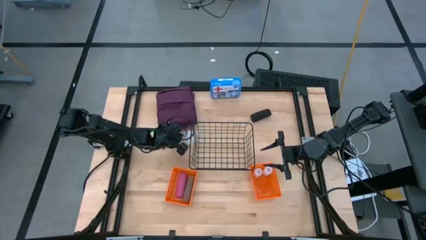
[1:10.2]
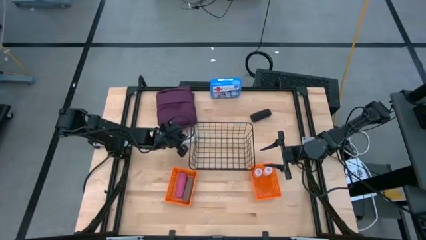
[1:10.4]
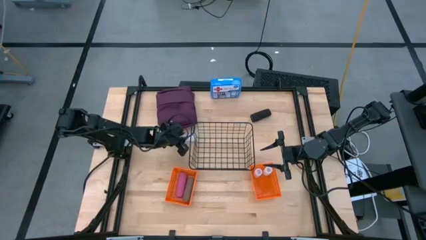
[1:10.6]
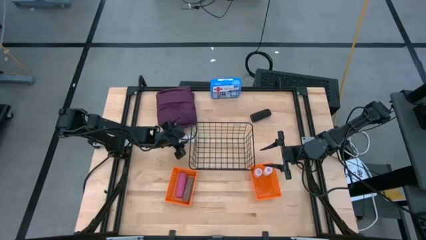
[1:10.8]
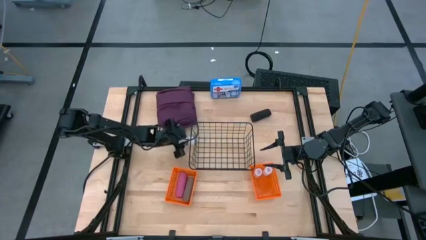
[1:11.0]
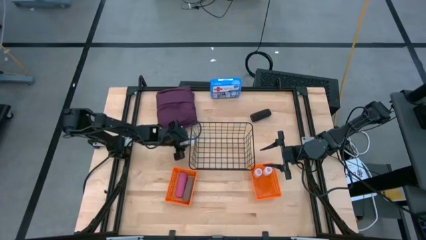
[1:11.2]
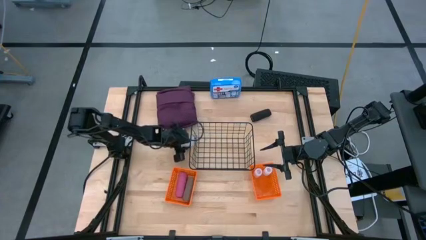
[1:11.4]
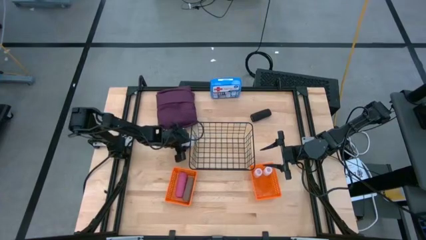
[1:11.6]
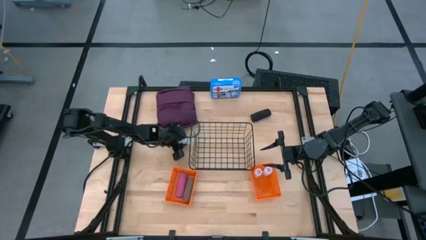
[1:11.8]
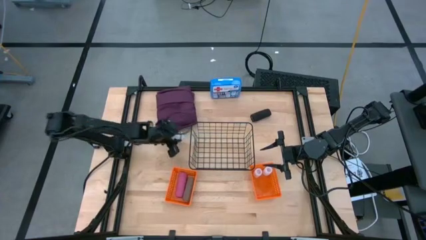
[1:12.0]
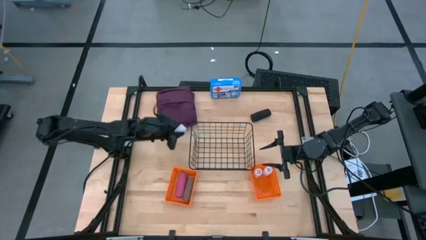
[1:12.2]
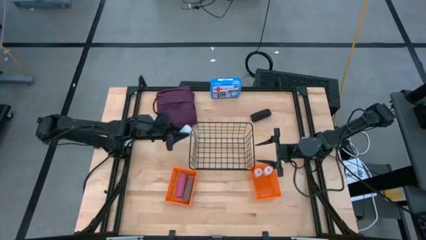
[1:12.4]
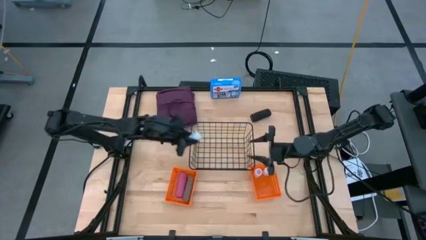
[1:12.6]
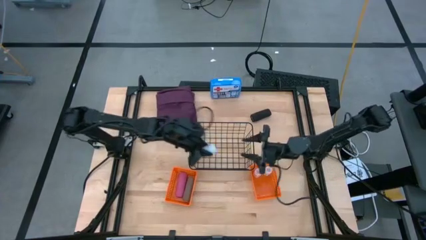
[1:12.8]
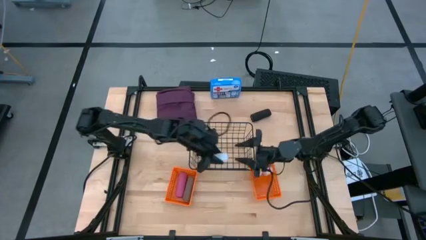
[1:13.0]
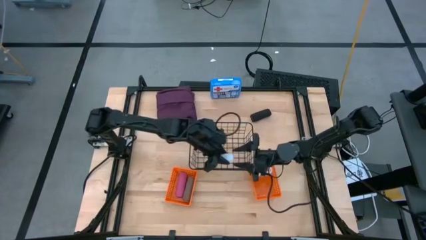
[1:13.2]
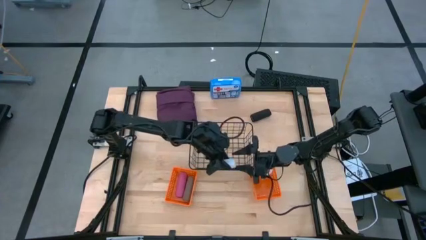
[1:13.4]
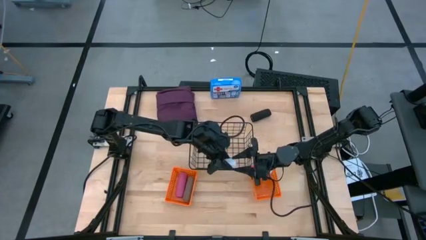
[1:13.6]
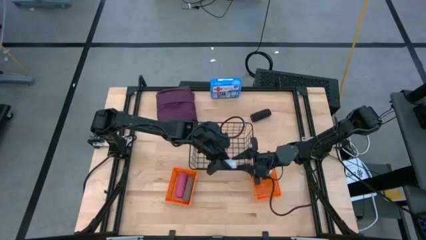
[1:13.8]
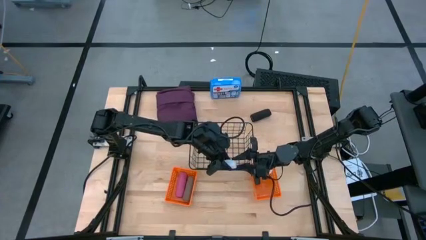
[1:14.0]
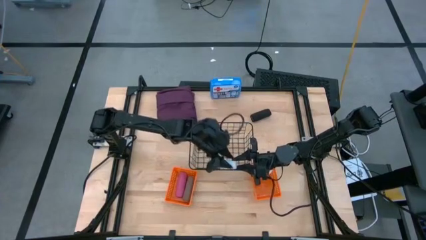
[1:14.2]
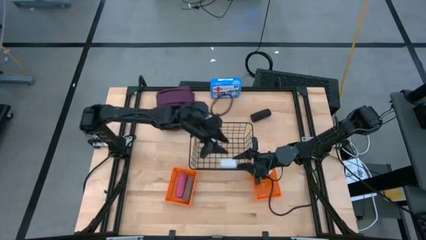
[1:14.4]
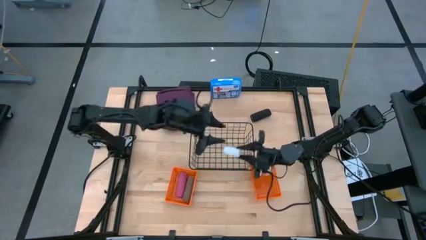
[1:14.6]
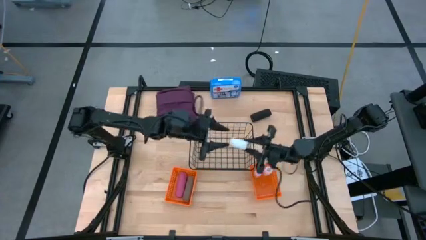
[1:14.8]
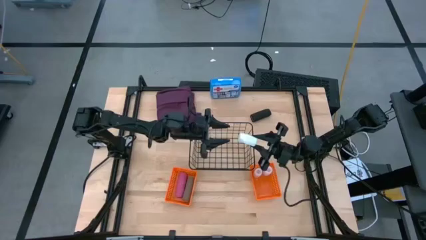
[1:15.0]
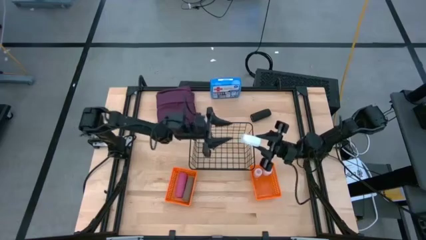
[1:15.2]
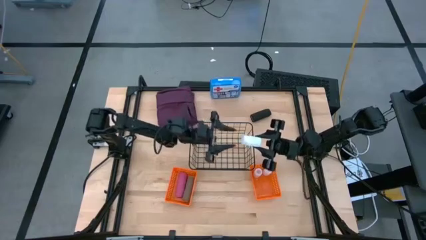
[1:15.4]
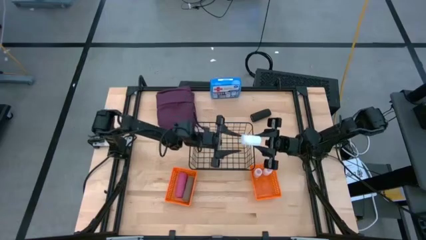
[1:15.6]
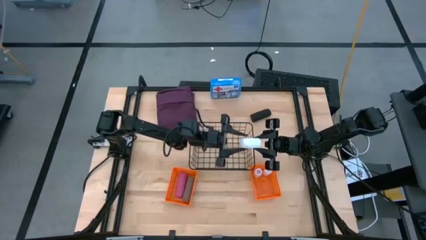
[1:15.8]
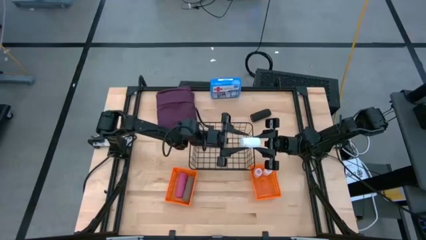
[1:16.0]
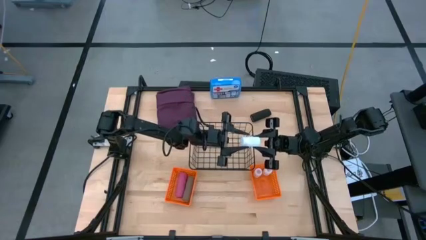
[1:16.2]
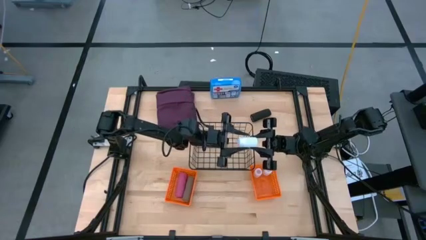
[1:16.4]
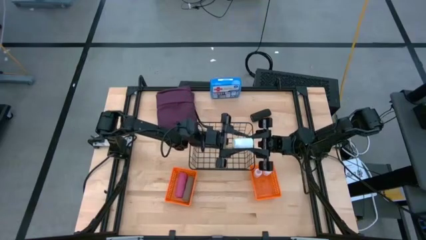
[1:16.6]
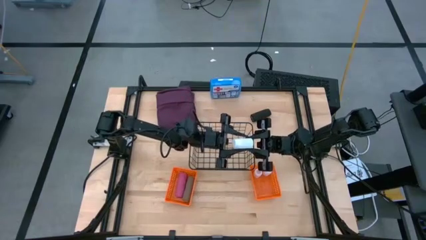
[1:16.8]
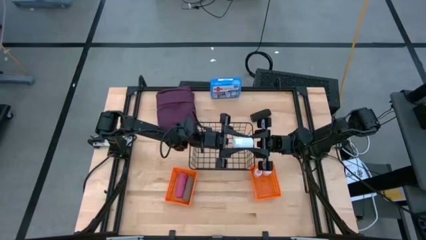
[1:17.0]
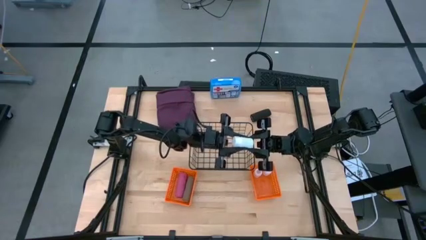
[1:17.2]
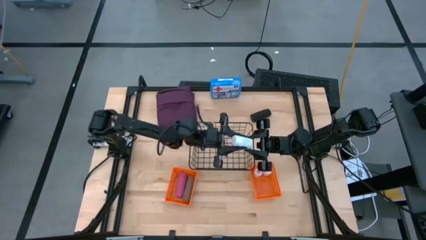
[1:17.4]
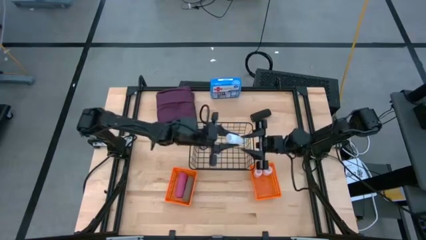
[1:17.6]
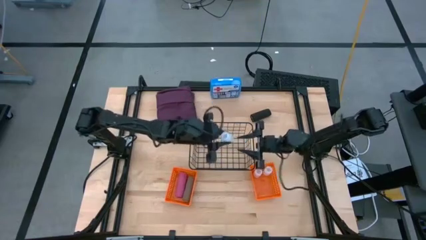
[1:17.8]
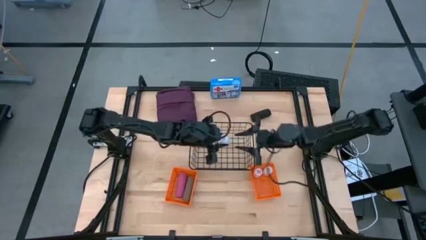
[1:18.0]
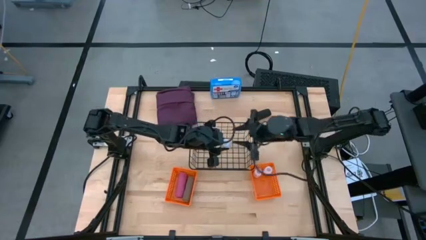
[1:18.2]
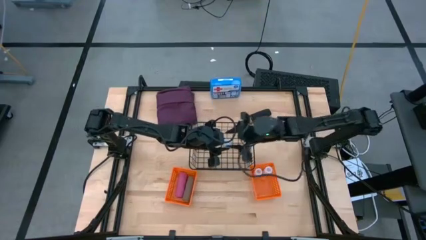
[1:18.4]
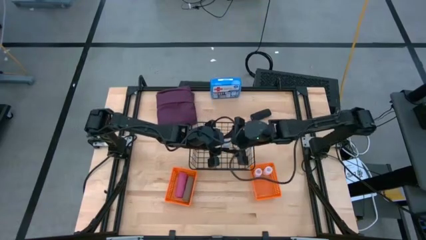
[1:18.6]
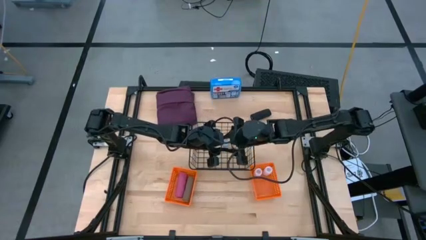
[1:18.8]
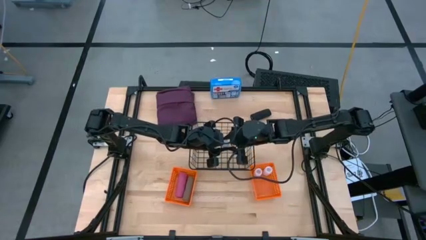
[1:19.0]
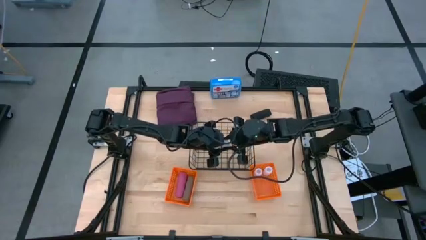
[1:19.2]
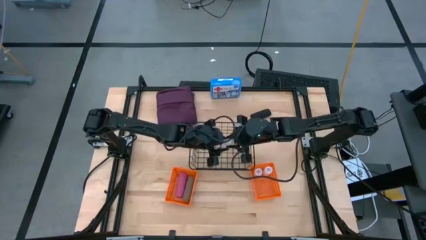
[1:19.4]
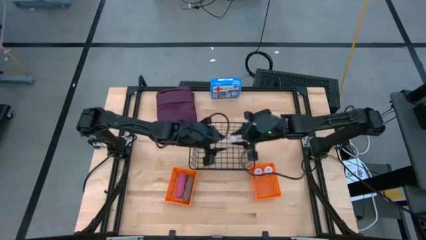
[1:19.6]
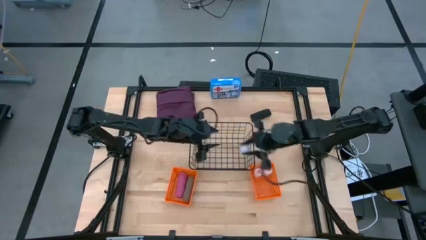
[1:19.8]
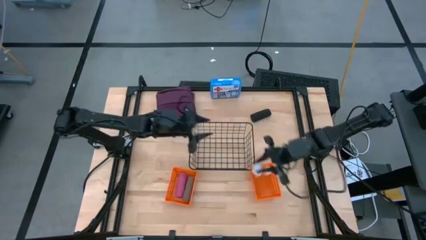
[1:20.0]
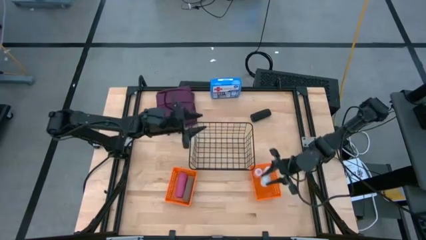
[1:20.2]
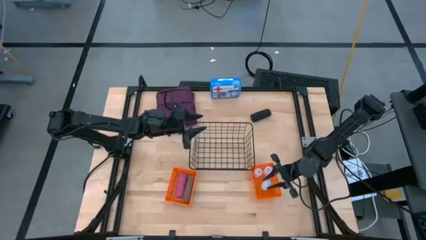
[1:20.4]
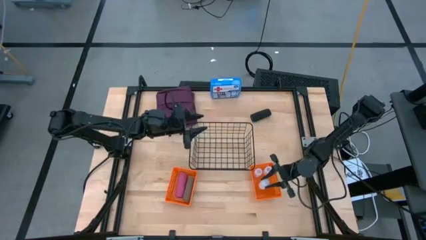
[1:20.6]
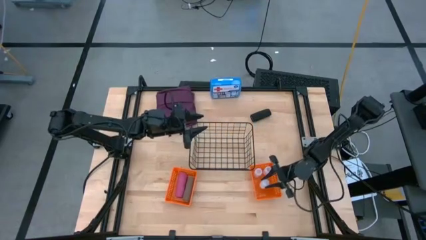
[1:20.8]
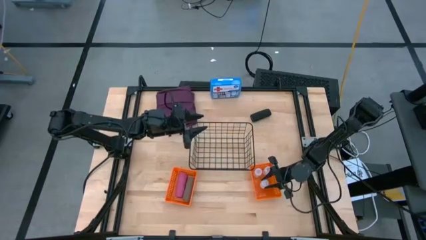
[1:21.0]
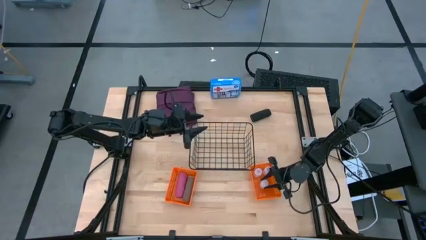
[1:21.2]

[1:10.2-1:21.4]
Task: Pick & Place Medicine items
Put the white pill bottle into the right orange basket

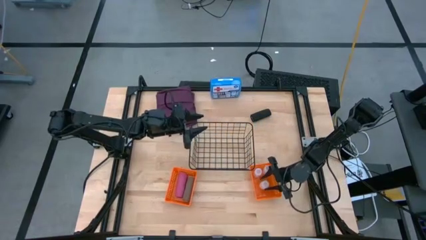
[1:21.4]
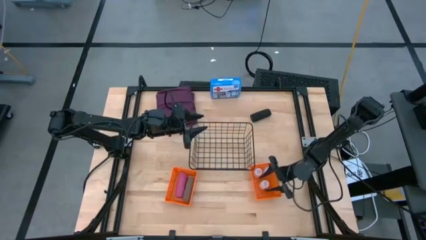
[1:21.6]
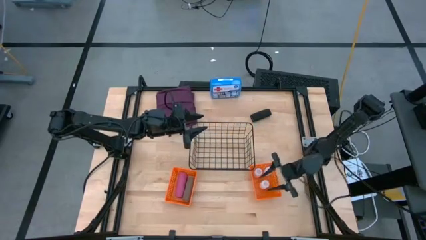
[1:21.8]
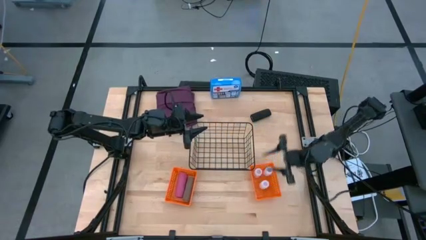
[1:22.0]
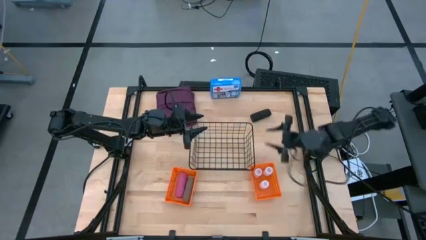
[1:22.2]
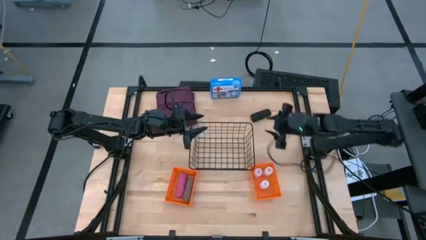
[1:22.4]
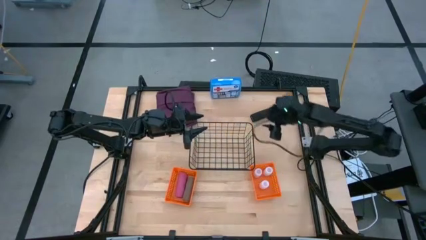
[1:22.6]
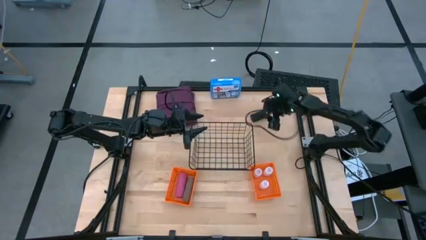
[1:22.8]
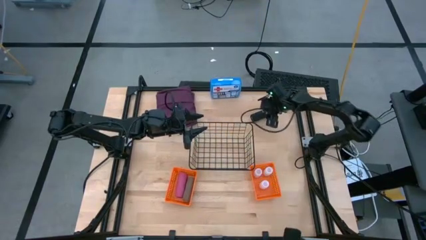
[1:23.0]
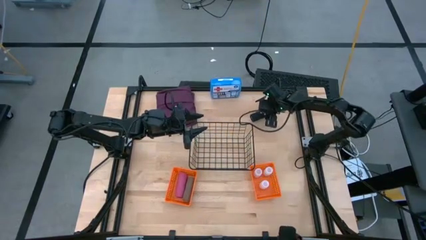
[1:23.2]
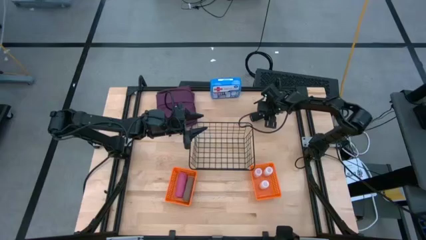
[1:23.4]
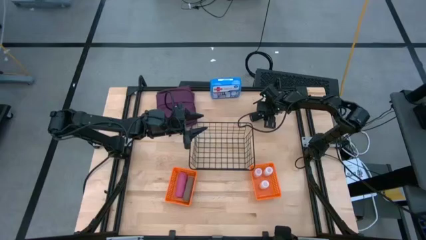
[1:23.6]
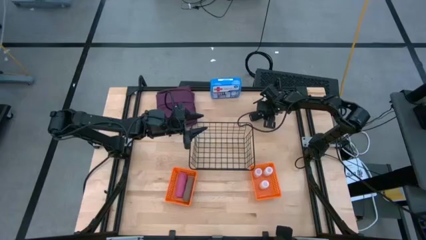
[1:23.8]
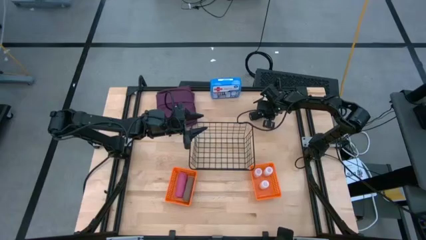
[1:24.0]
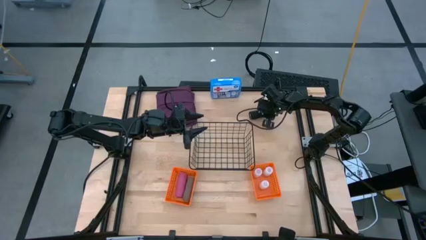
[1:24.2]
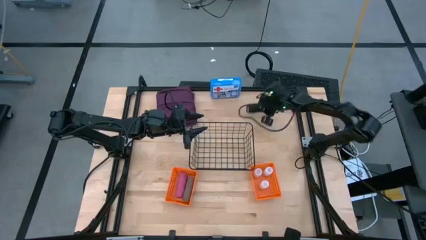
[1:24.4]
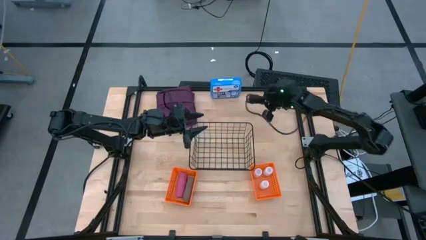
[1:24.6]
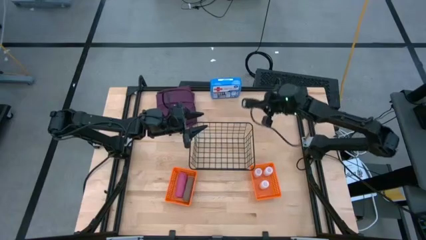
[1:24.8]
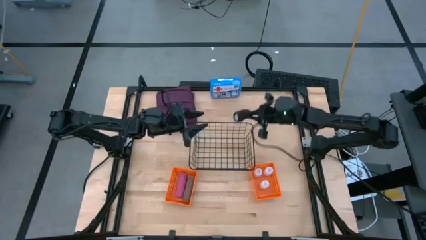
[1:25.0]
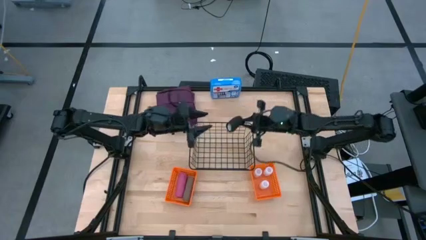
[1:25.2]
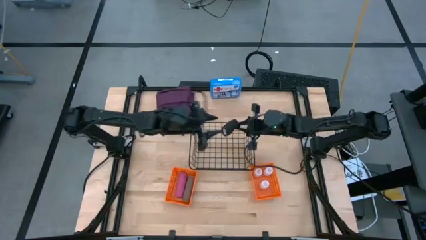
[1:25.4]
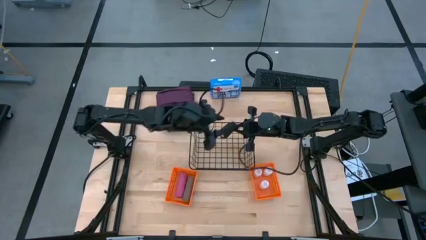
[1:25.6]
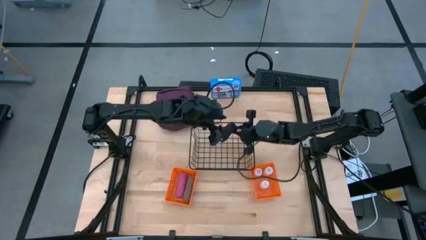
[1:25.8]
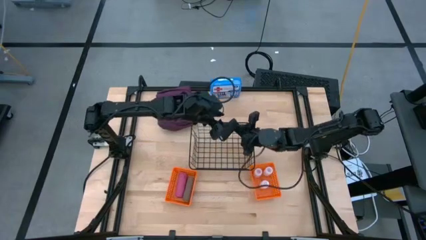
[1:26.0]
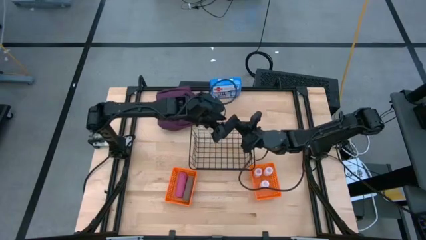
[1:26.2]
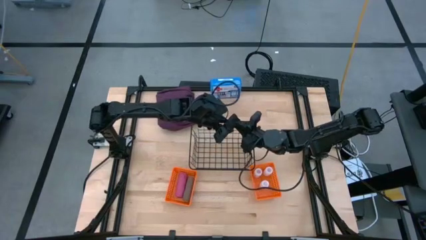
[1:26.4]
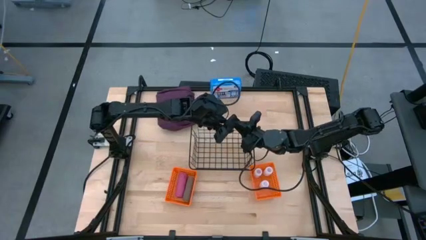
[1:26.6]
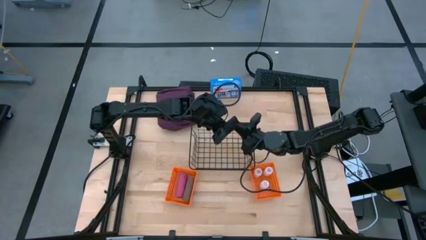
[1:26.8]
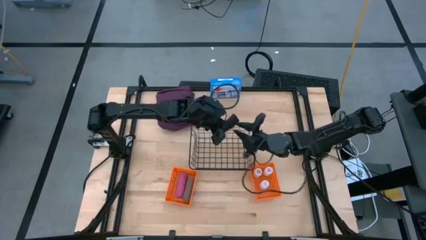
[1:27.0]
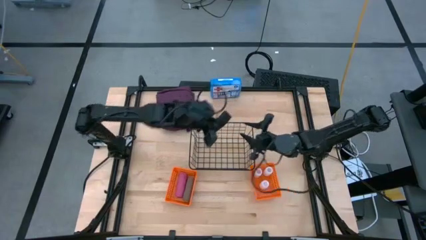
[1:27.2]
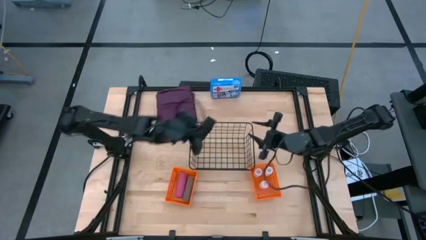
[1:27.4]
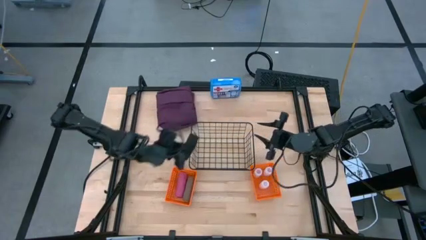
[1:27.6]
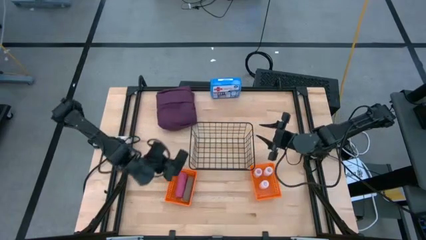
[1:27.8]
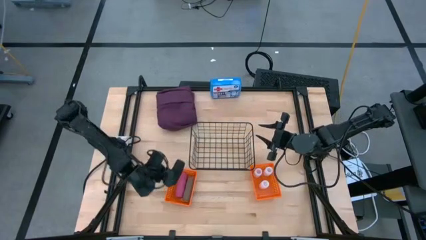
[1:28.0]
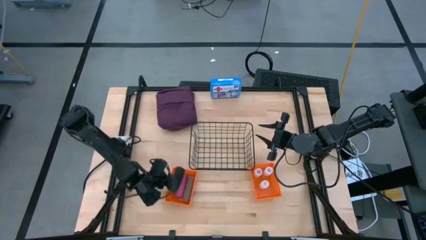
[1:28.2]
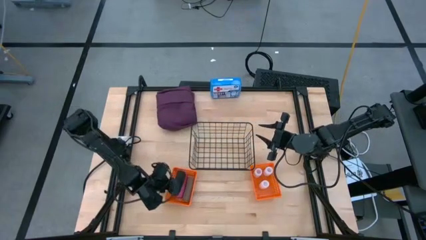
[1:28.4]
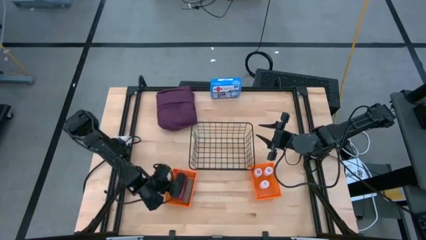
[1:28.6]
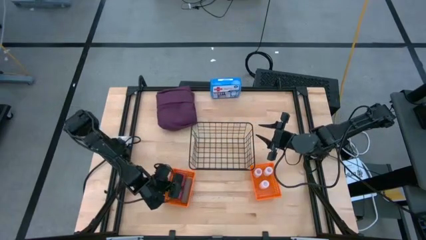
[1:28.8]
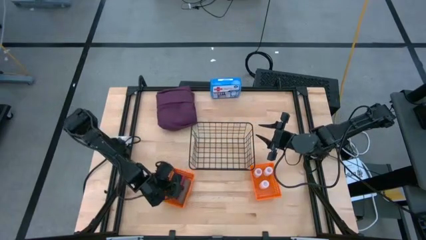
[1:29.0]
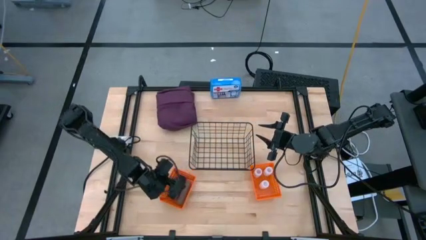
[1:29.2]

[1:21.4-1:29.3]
Put the black bandage into the left orange basket
